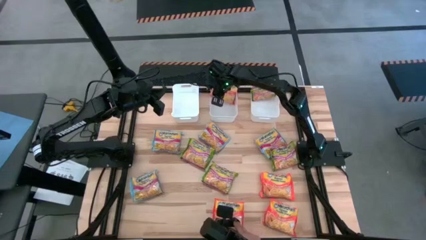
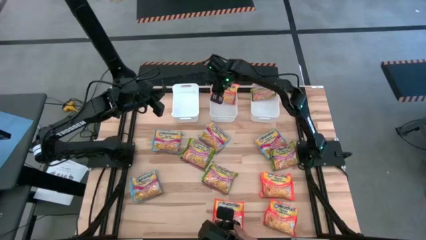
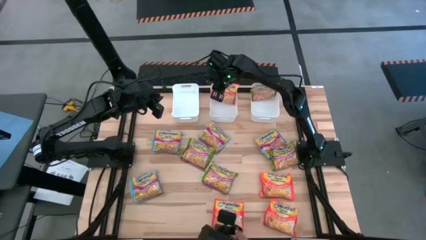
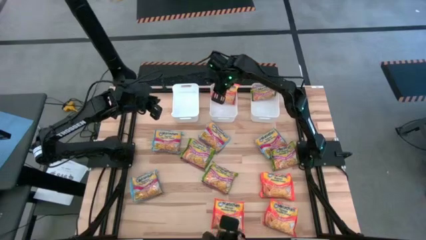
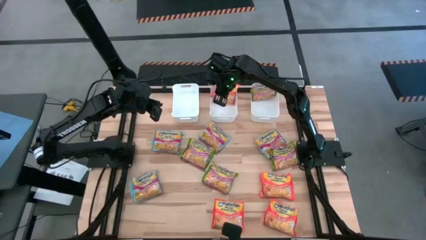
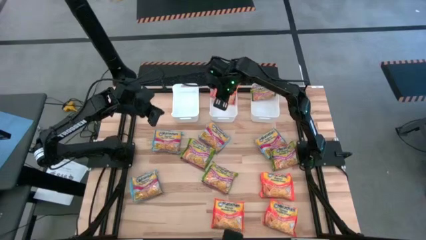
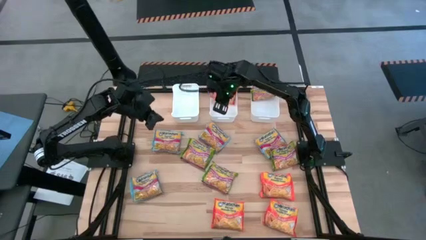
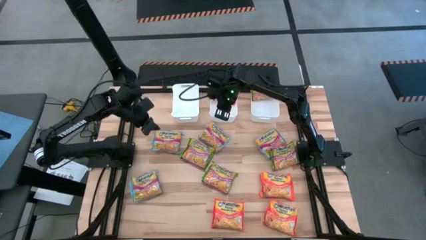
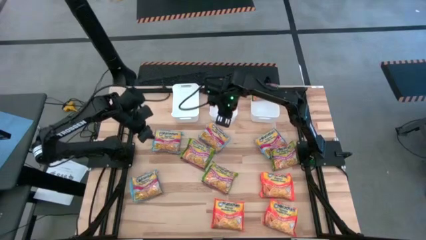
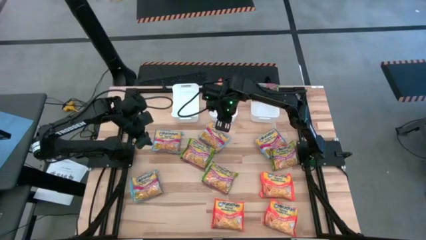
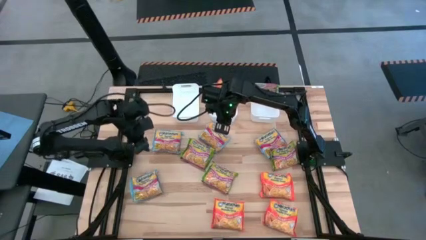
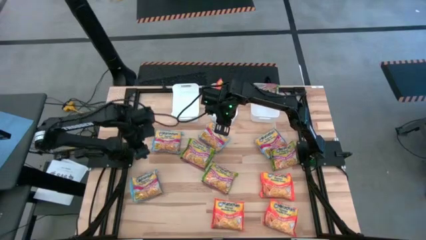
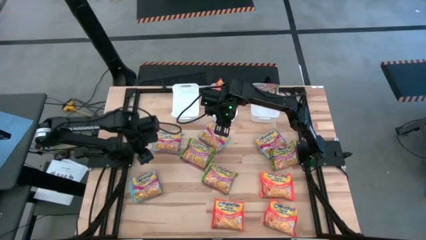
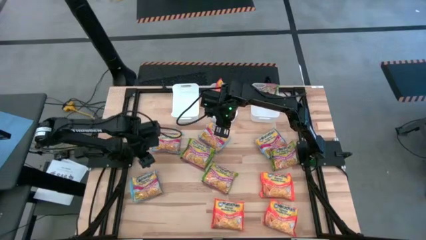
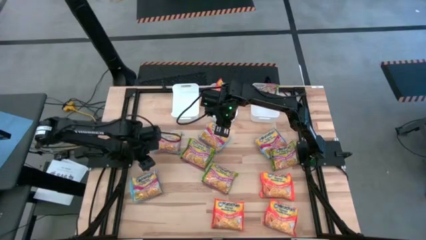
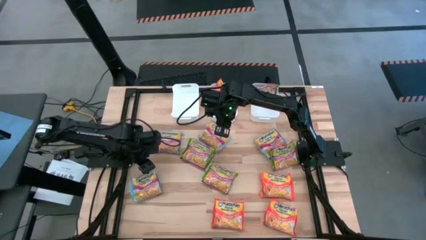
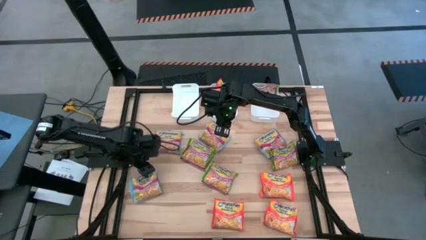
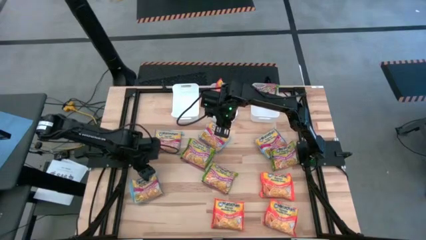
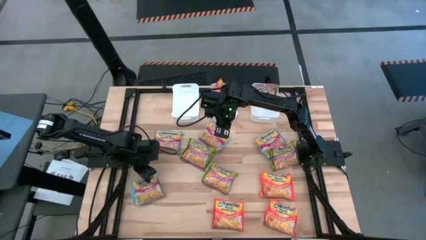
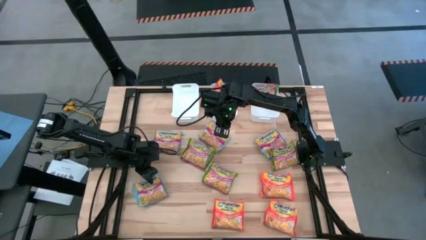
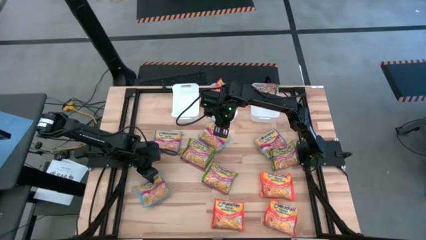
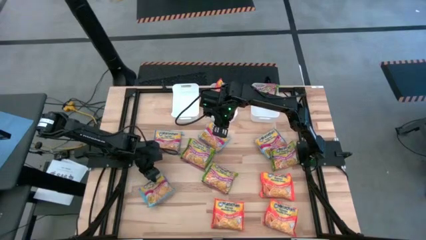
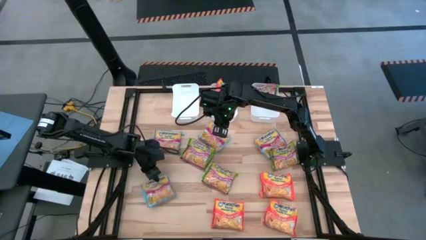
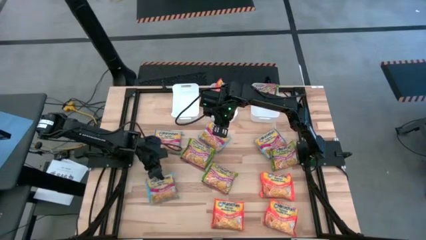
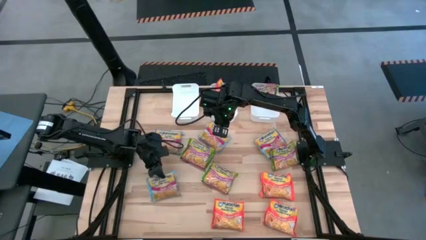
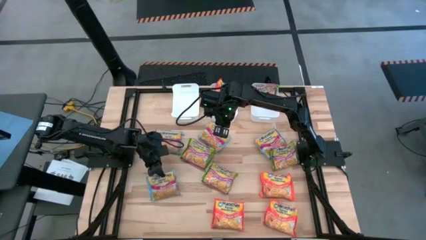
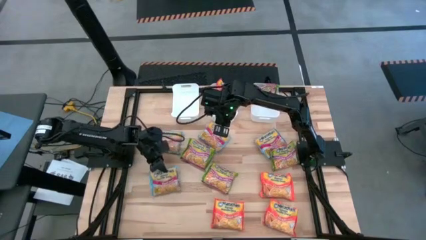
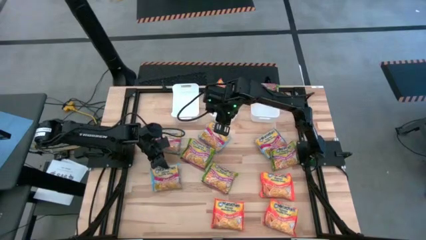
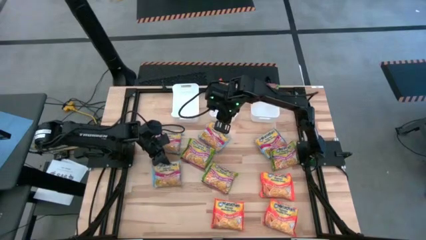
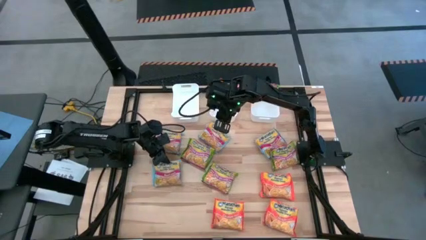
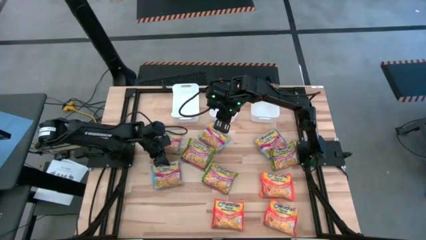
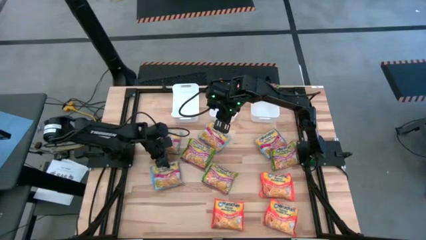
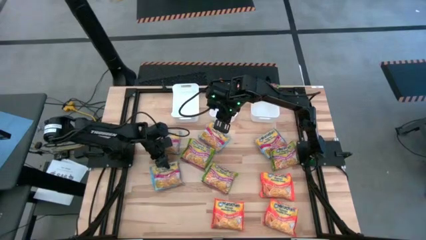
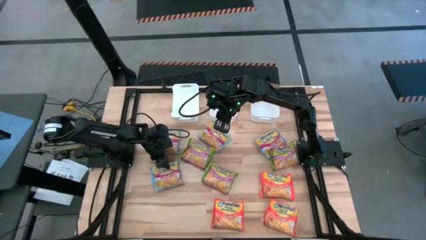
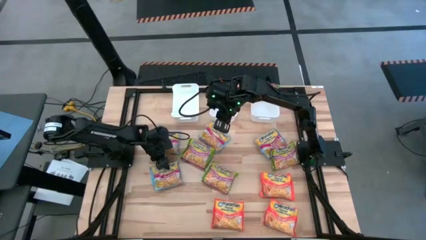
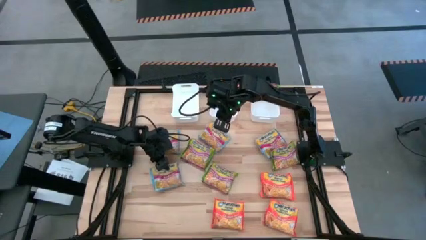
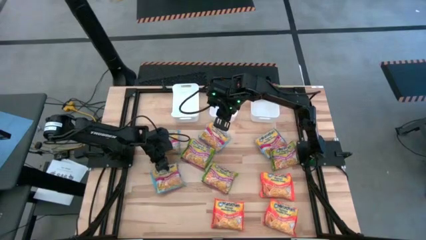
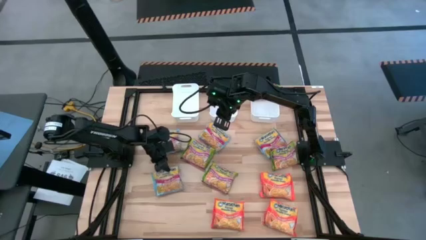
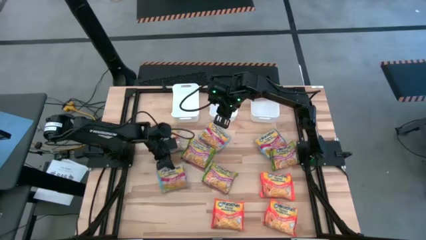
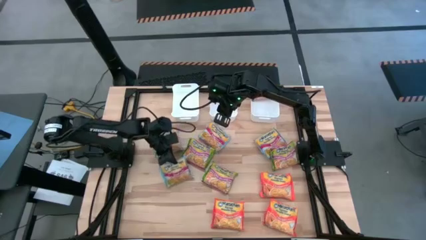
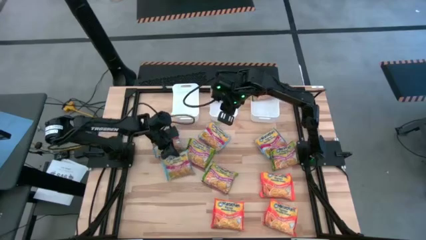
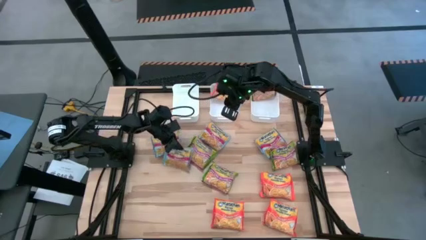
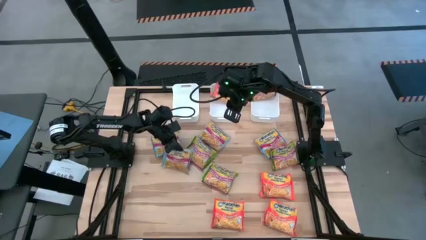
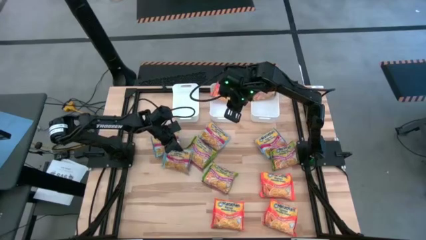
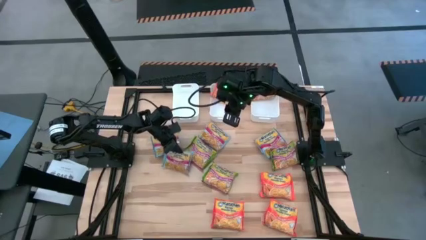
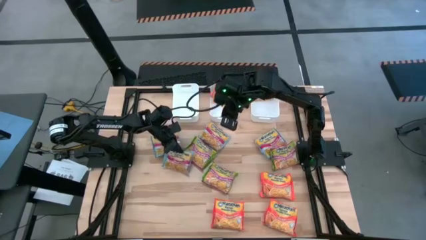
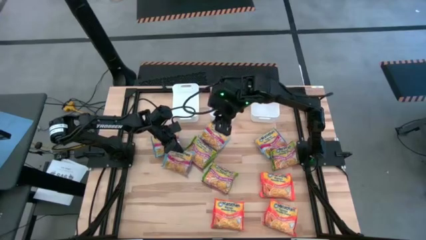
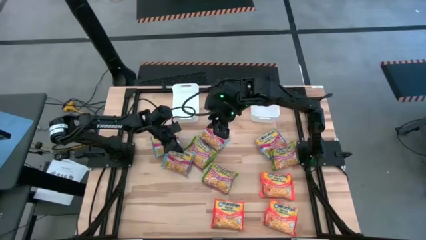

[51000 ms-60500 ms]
Task: Sort Maruchan noodles
Put the blue noodle pack into the left white bin

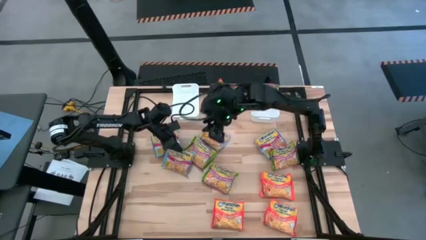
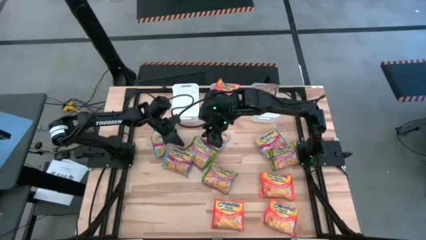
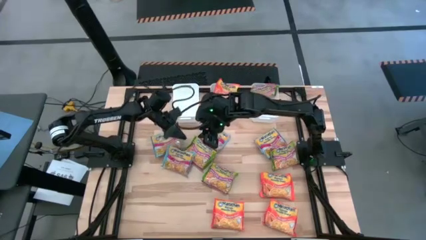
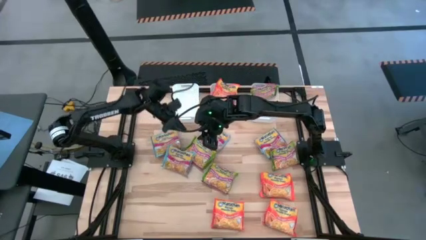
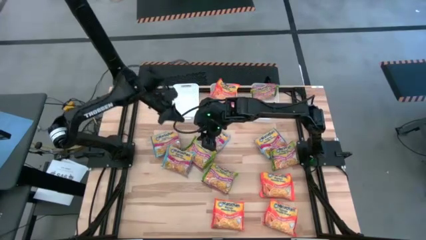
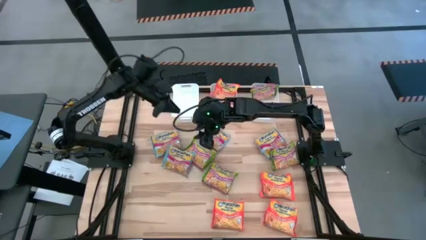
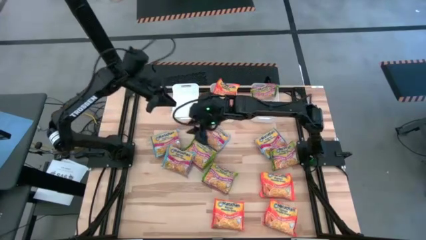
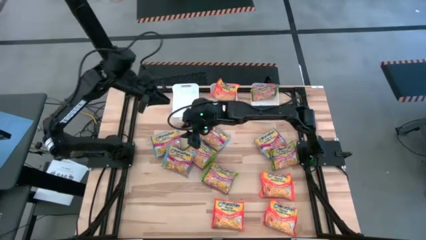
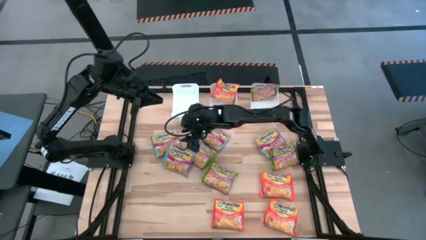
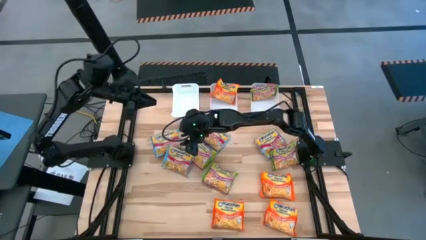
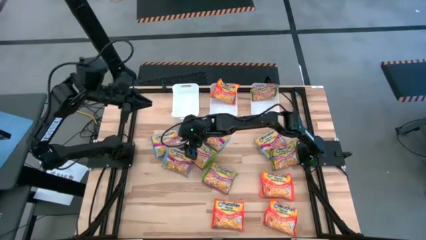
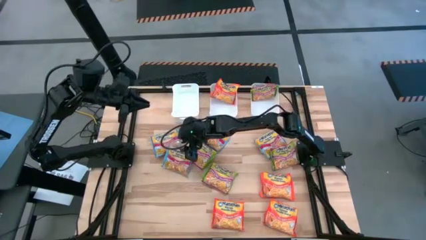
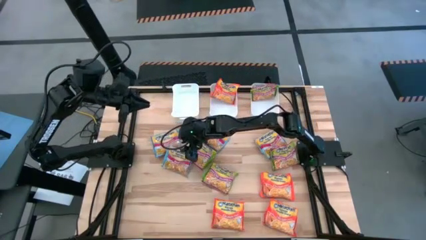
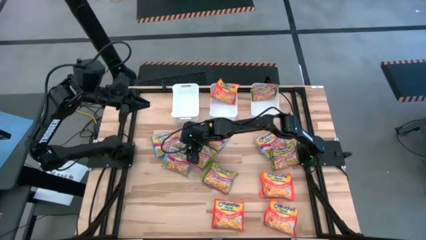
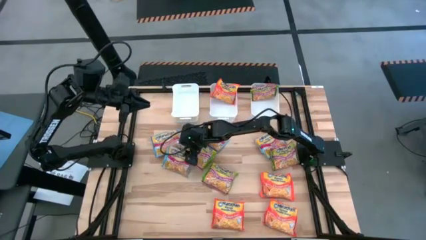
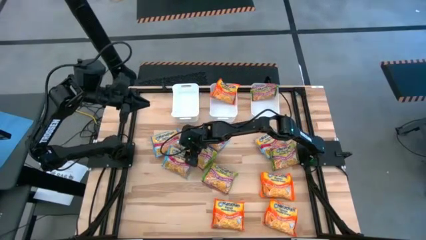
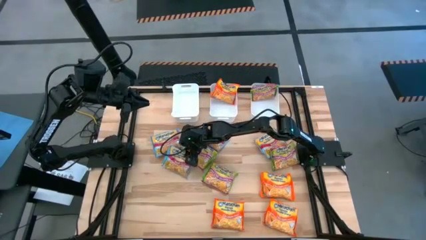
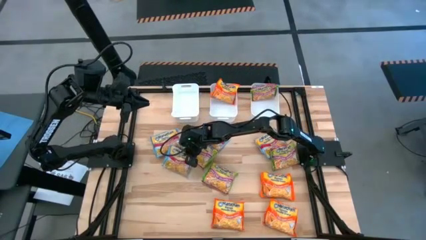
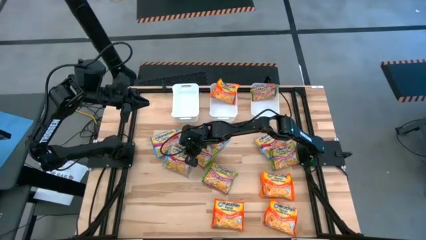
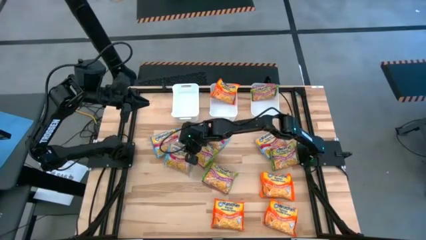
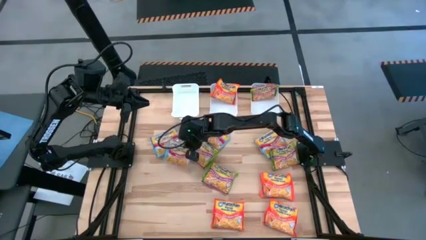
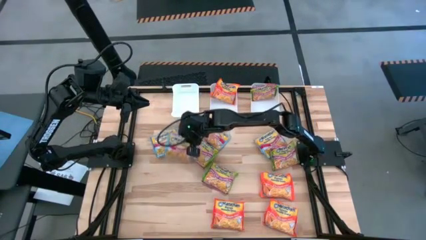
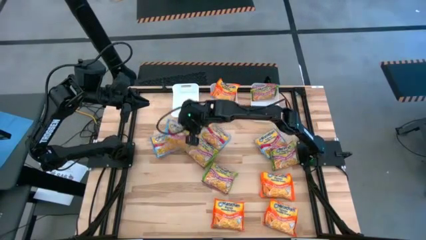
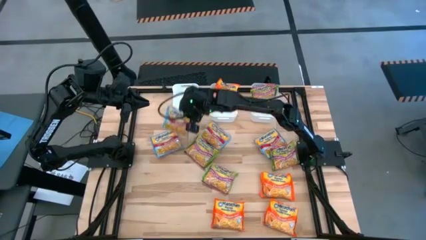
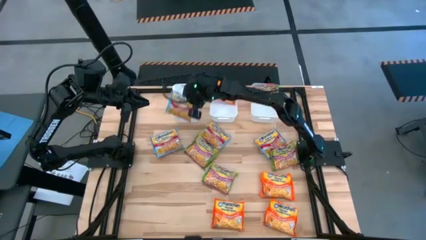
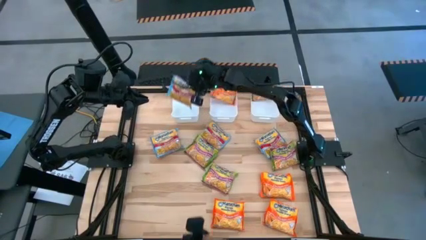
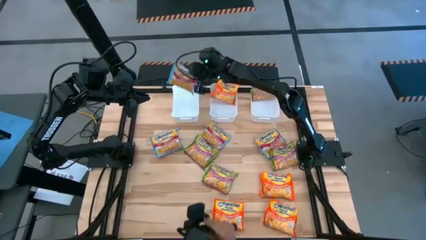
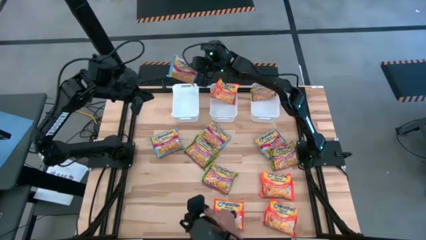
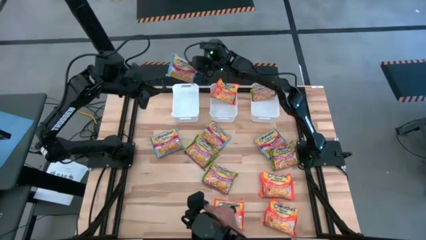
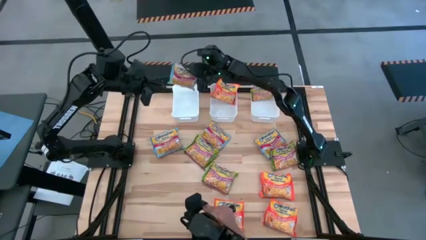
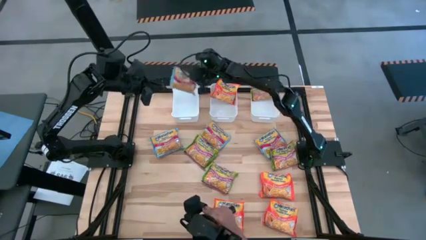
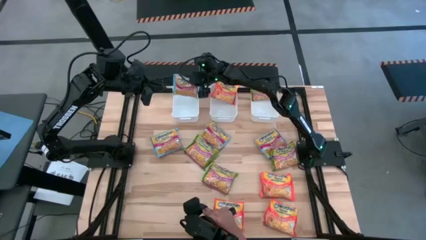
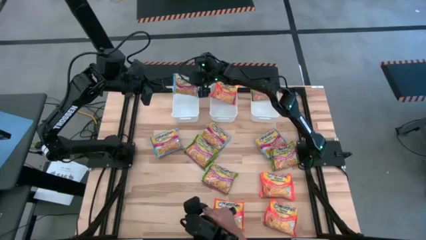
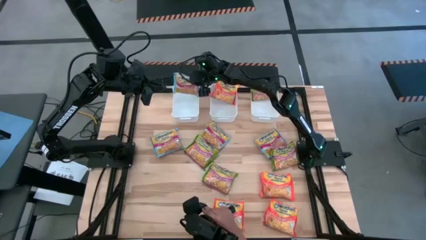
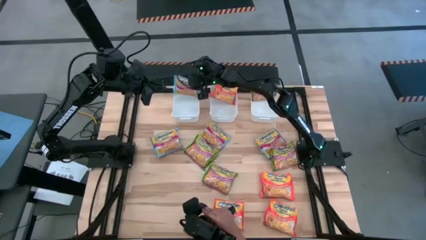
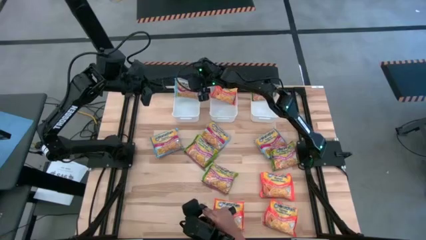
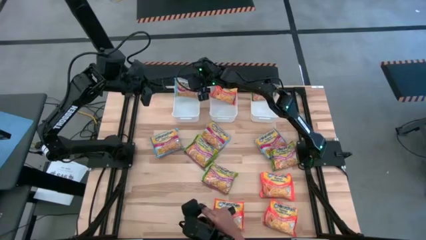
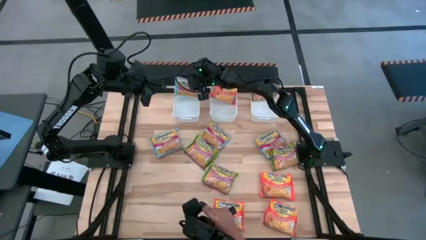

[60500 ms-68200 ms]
Put the blue noodle pack into the left white bin
